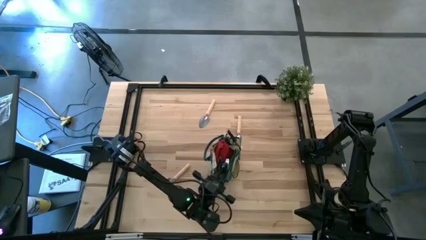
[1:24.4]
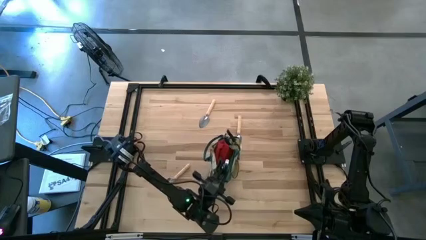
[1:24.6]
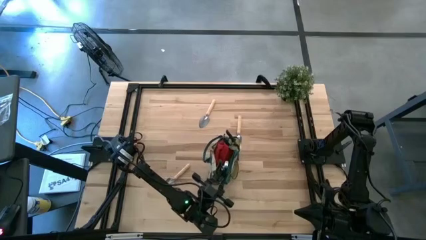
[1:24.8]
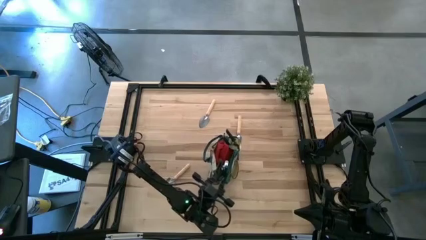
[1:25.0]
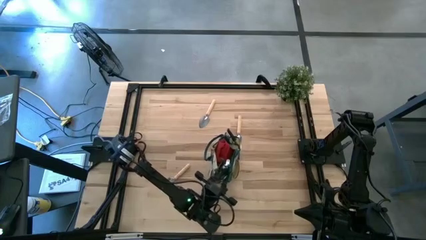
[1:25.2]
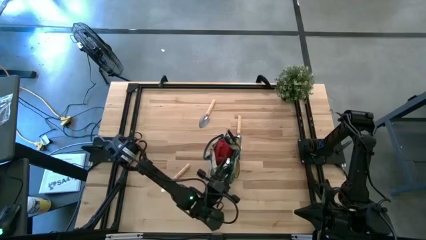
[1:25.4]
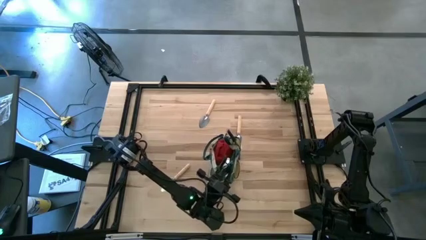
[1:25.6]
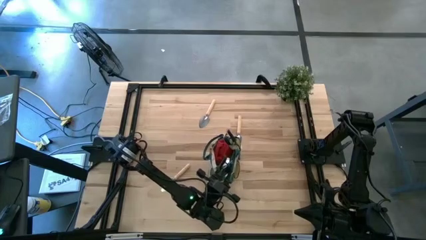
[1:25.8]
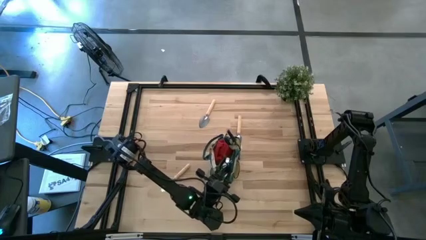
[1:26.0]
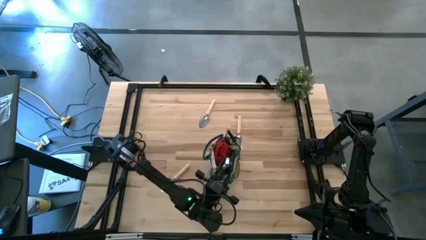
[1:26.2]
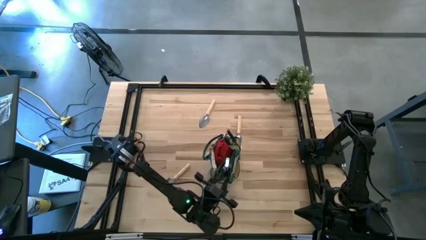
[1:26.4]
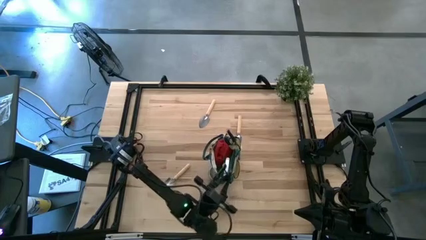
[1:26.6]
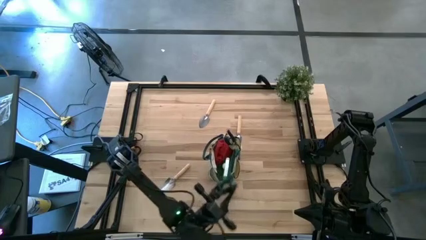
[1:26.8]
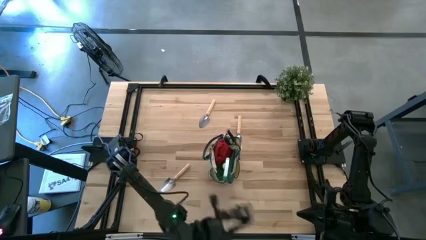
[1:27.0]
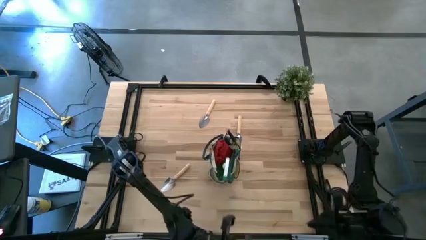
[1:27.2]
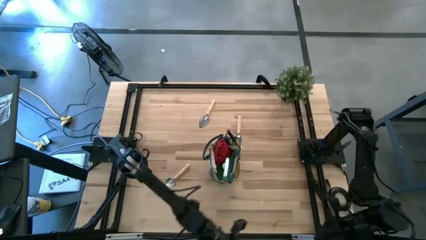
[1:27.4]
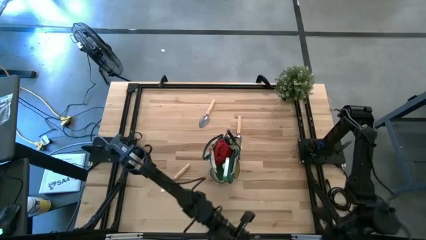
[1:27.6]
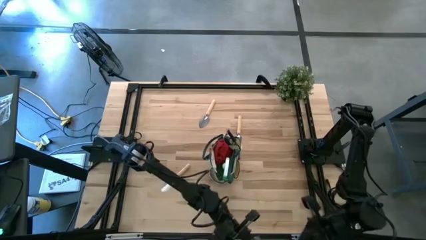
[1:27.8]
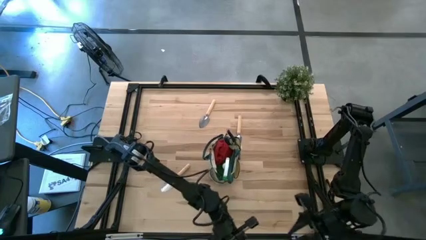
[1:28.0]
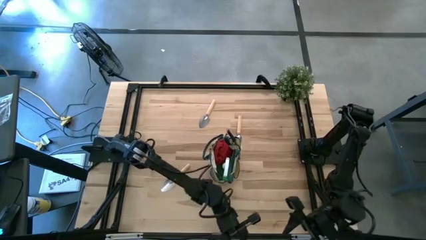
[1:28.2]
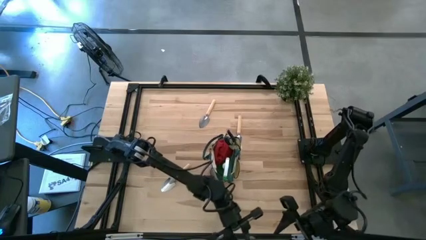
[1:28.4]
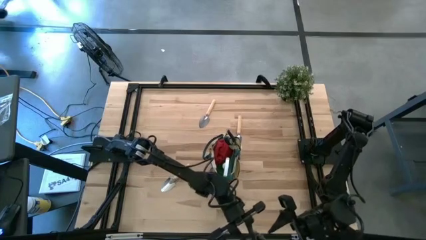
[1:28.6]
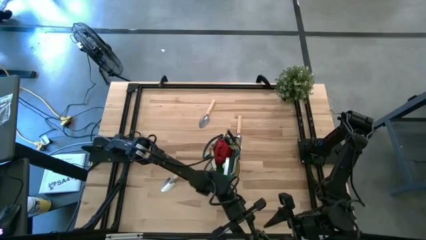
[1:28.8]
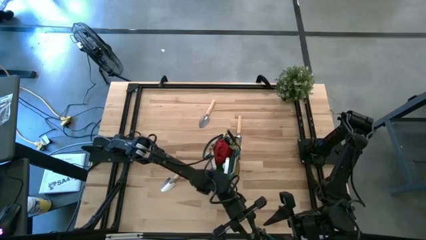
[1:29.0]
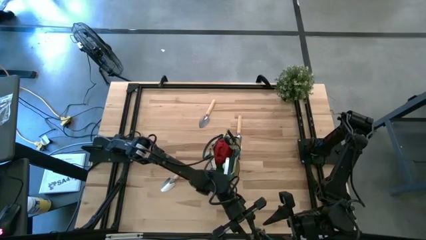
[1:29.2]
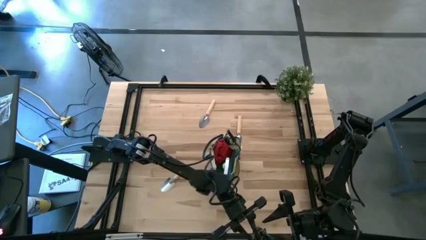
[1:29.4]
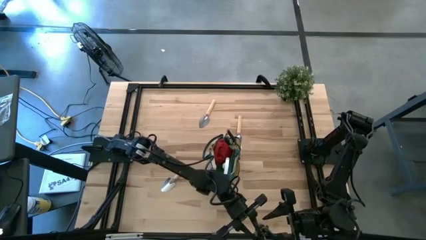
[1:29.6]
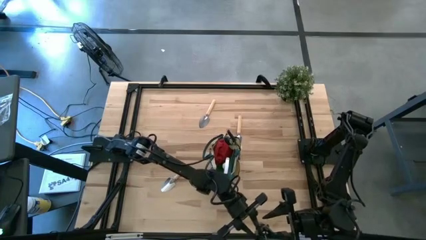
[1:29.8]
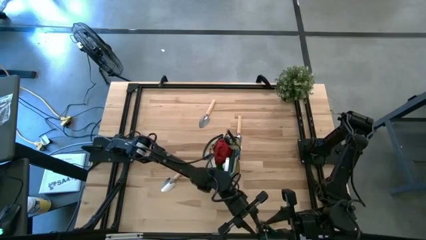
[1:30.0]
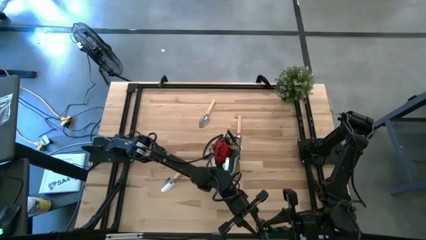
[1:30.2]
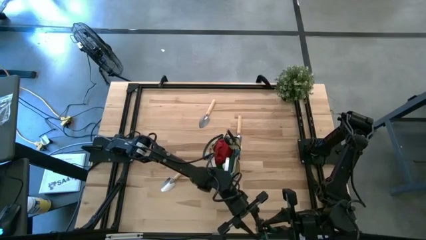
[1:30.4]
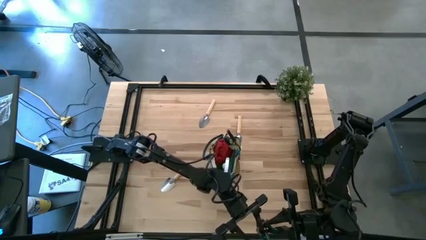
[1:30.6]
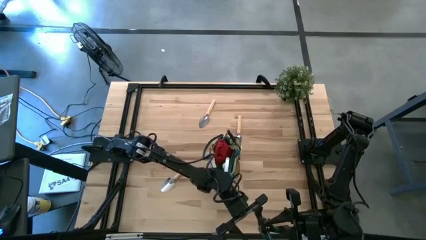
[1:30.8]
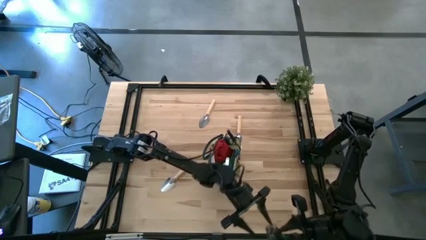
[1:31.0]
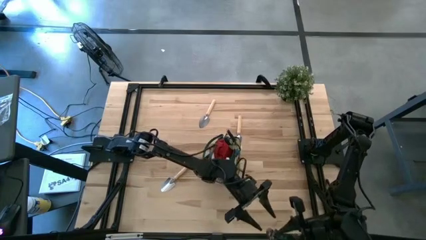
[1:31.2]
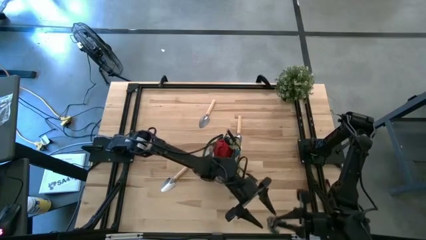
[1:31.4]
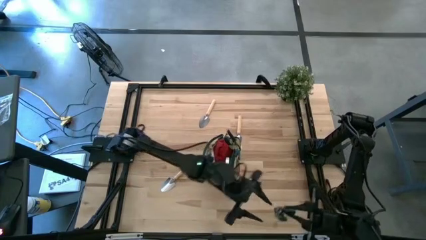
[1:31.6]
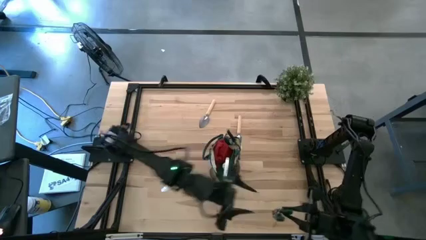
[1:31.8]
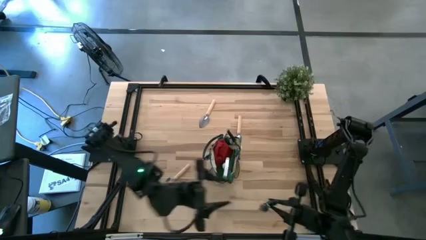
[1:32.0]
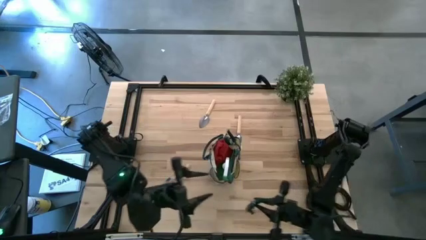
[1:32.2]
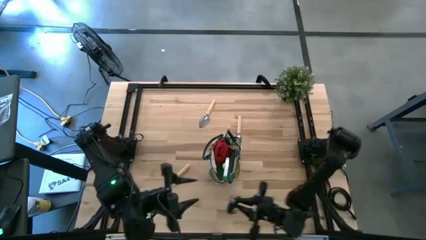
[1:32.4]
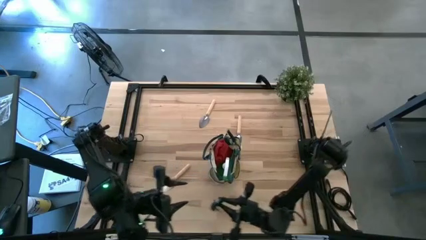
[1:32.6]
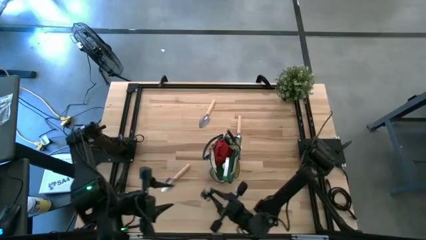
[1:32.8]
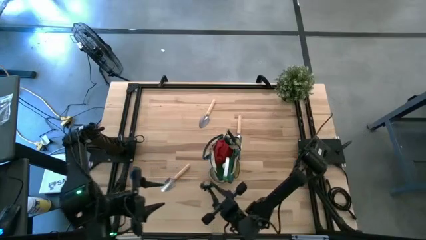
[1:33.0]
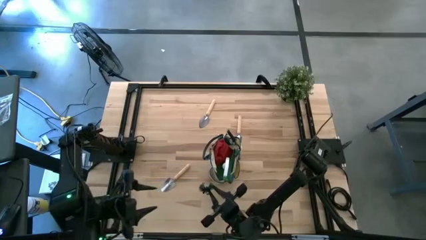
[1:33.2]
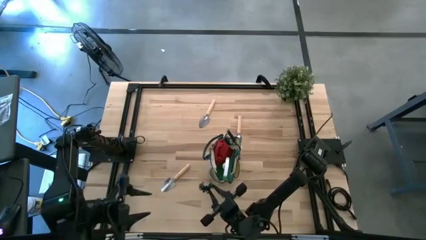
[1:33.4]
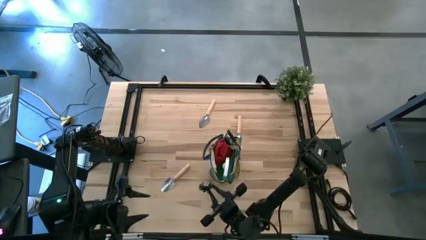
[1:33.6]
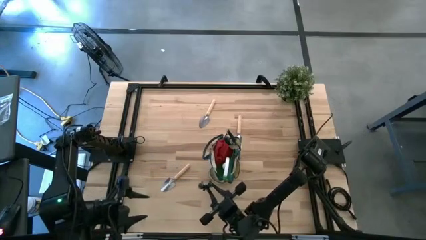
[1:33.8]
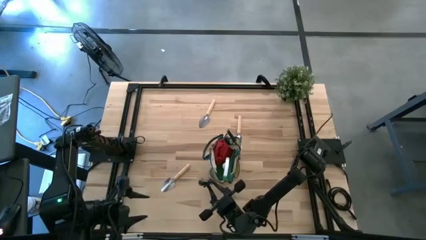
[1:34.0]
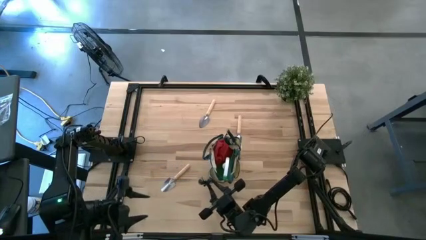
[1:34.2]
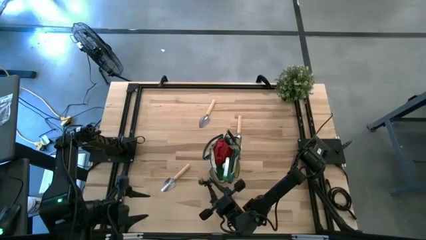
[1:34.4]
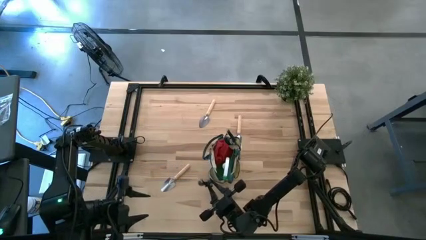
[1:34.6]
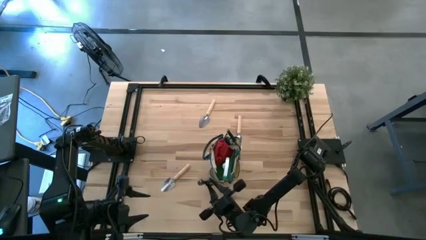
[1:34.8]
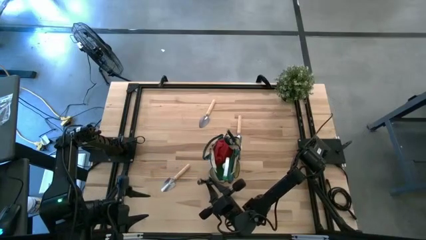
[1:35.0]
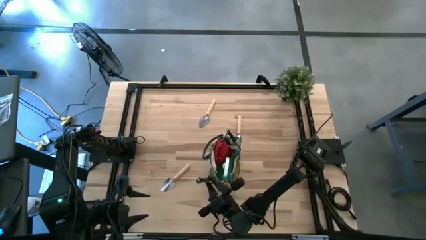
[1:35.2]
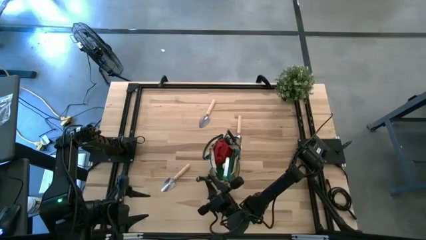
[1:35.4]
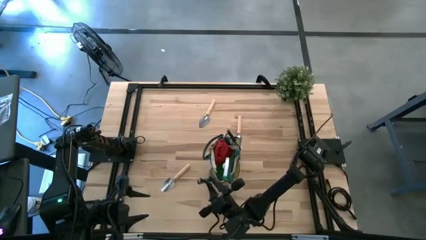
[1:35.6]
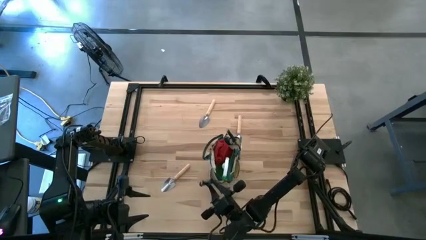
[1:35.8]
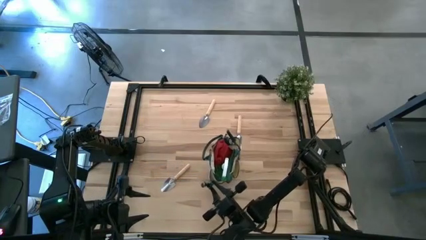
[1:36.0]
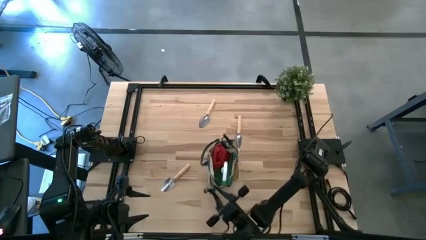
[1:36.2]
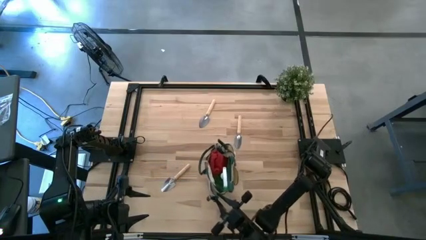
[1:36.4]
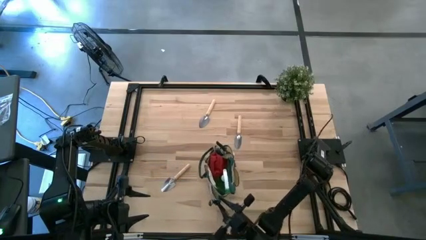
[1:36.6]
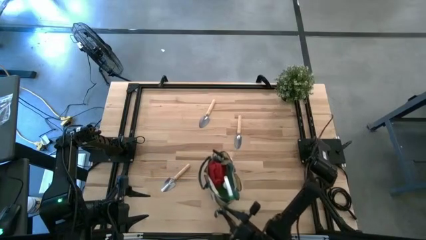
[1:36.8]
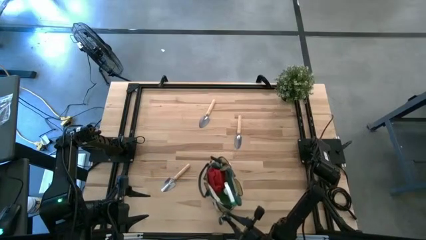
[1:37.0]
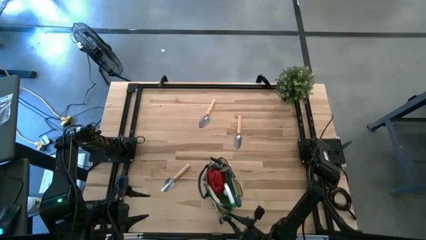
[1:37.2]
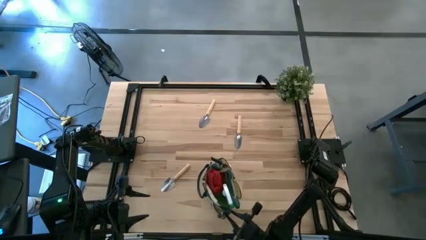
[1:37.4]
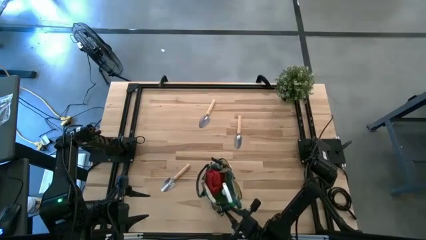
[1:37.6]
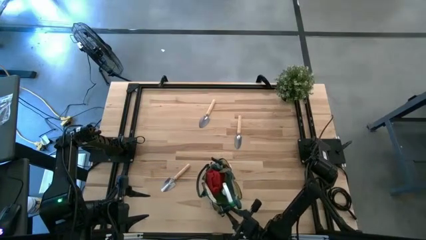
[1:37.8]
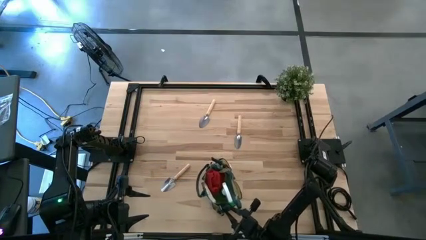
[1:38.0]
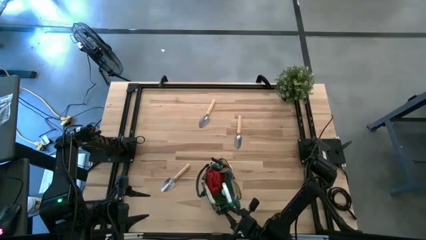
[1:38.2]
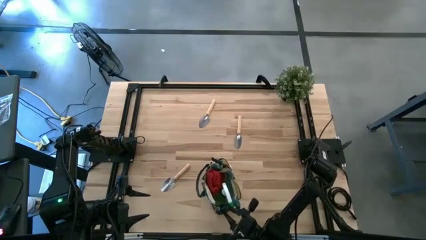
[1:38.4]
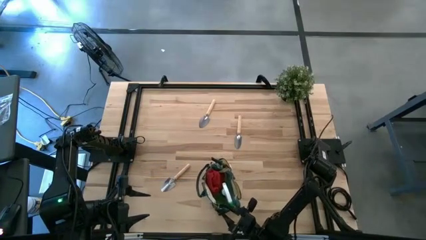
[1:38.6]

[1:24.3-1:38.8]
Task: Pick & Place Garden tools in Gardening bag
Put the shear scissors into the gardening bag
